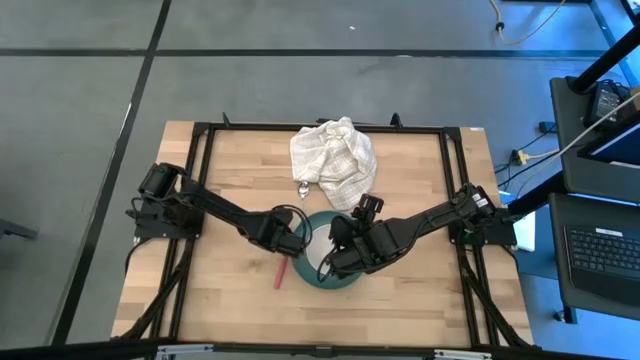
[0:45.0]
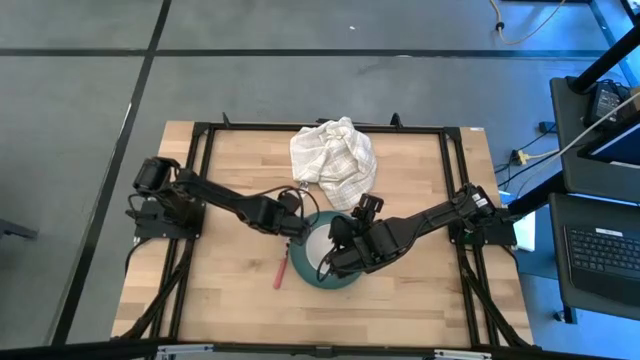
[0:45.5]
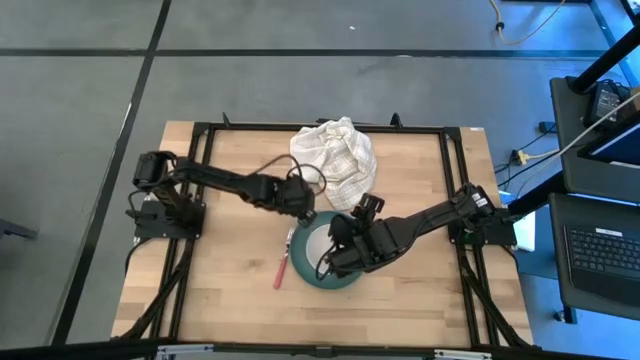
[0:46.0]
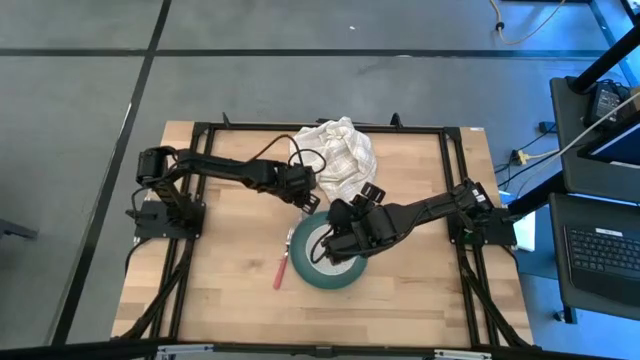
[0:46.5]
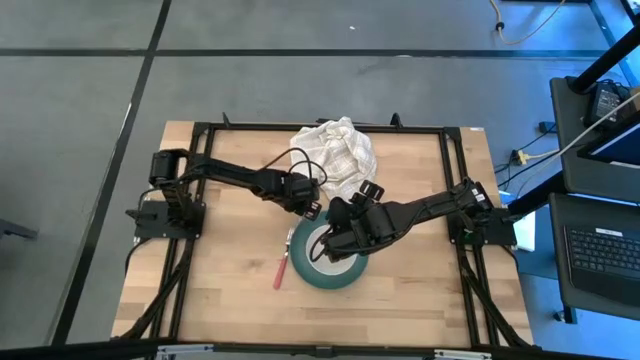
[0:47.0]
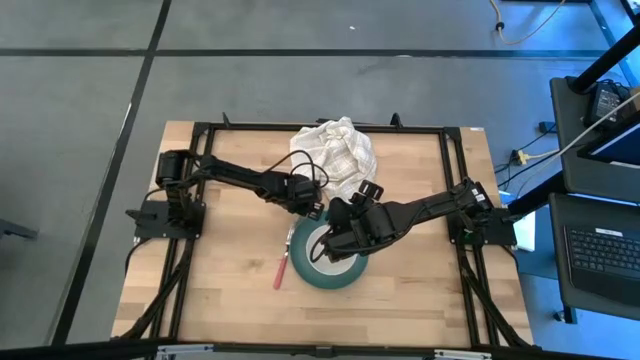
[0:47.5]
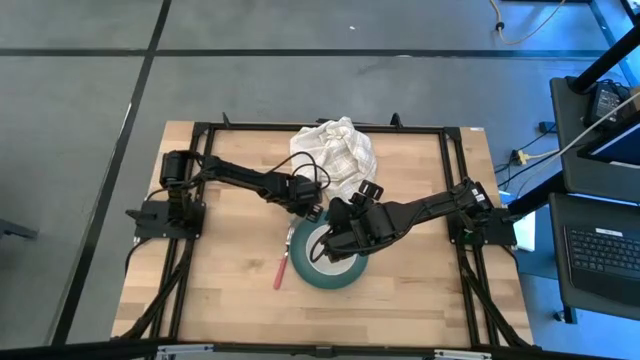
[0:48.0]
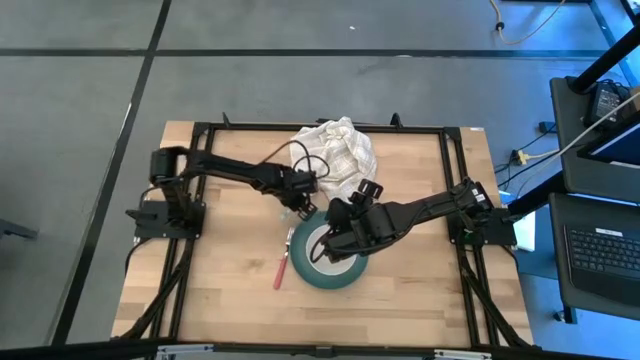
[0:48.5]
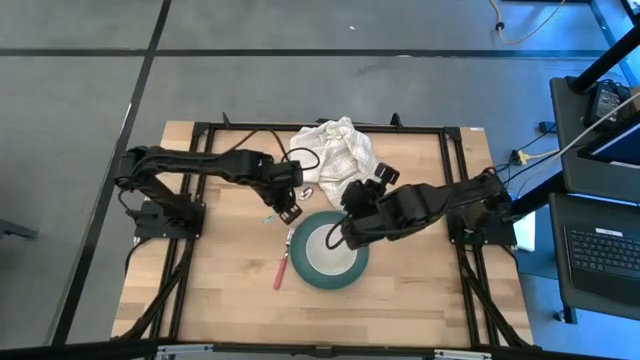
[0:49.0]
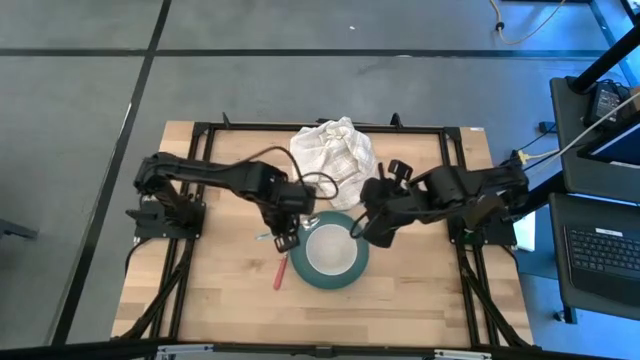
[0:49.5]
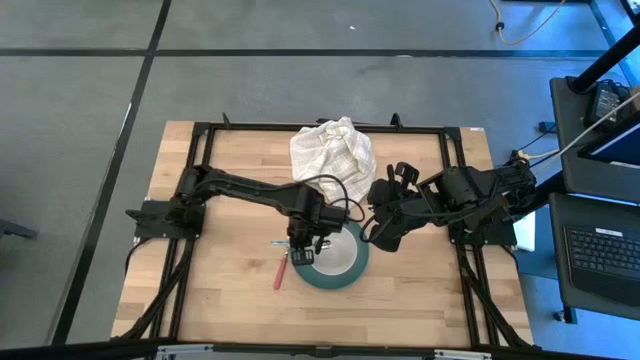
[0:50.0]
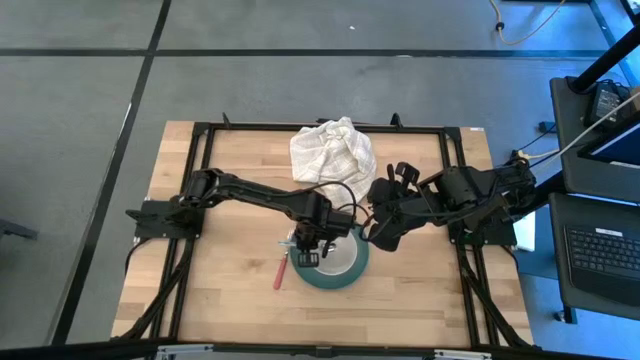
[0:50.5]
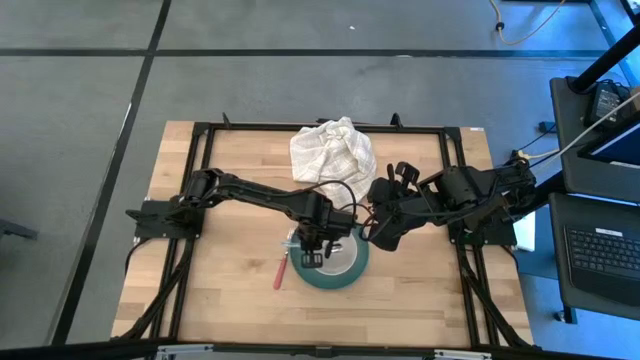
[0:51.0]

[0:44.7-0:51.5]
Task: Set table place
Put the blue spoon into the white bowl

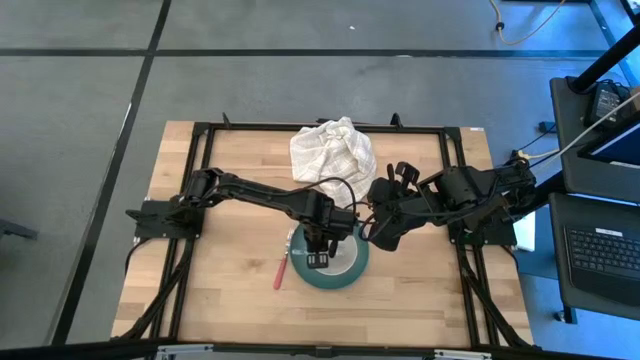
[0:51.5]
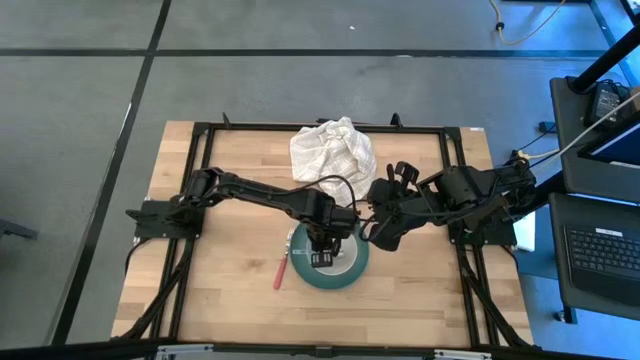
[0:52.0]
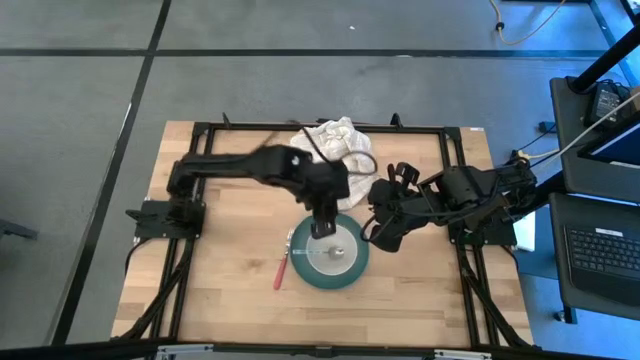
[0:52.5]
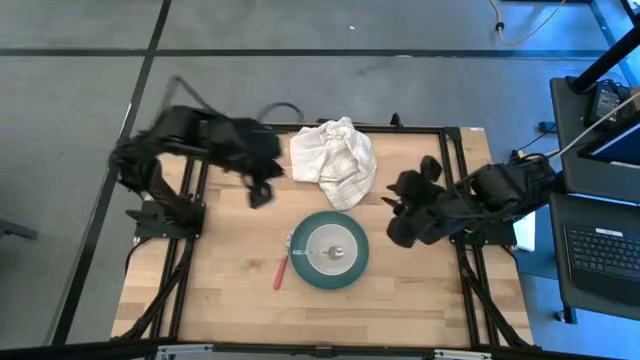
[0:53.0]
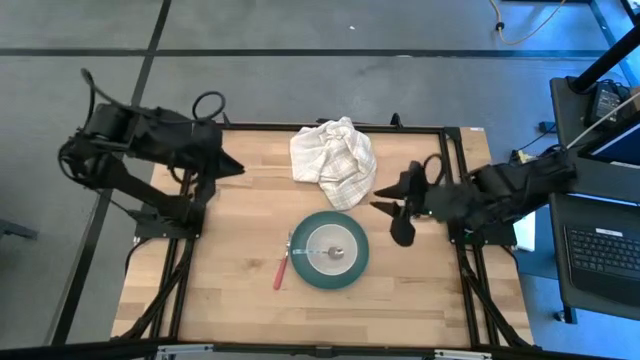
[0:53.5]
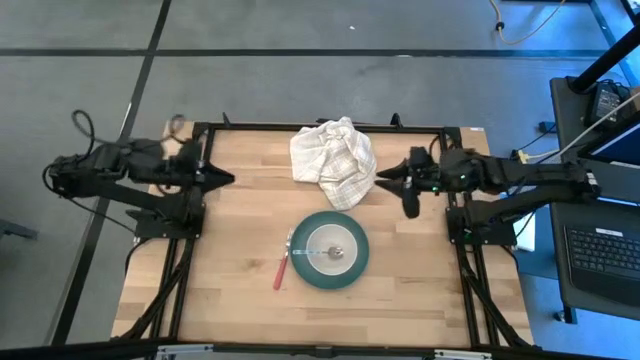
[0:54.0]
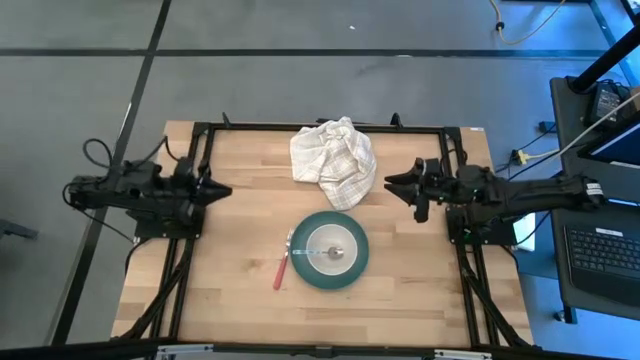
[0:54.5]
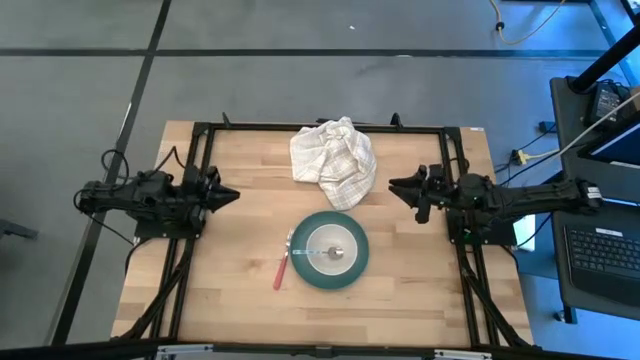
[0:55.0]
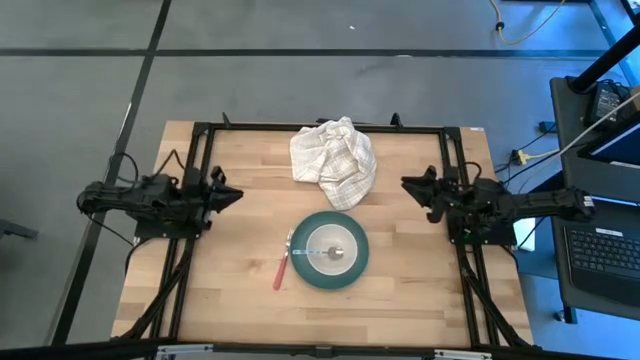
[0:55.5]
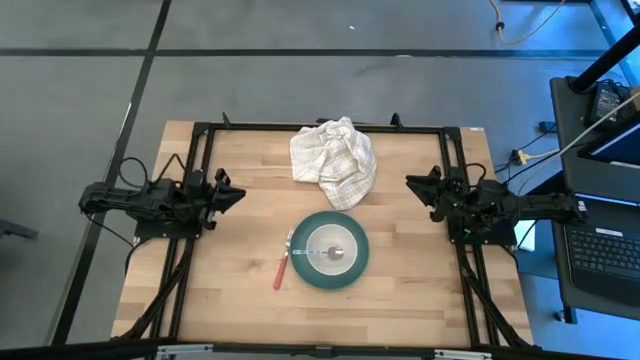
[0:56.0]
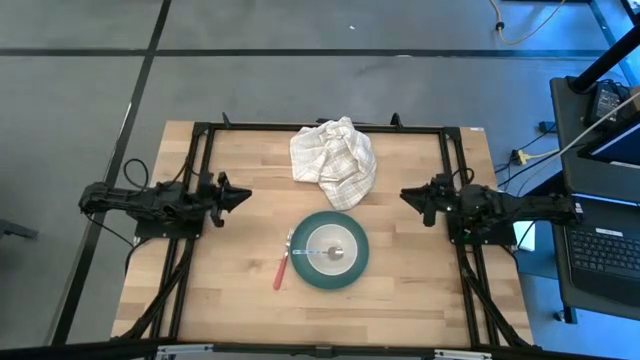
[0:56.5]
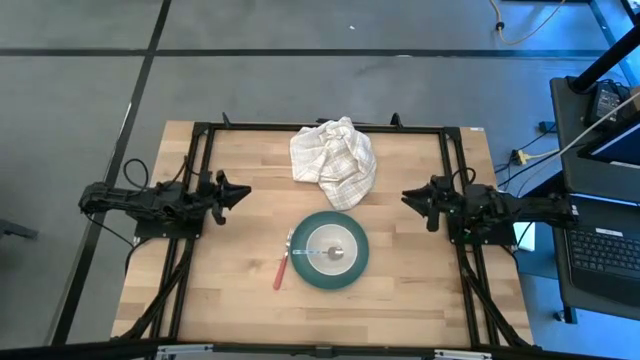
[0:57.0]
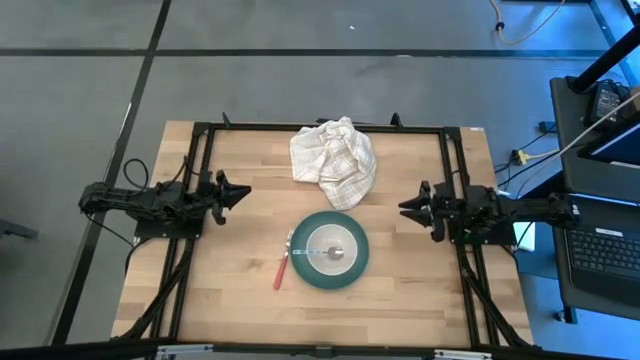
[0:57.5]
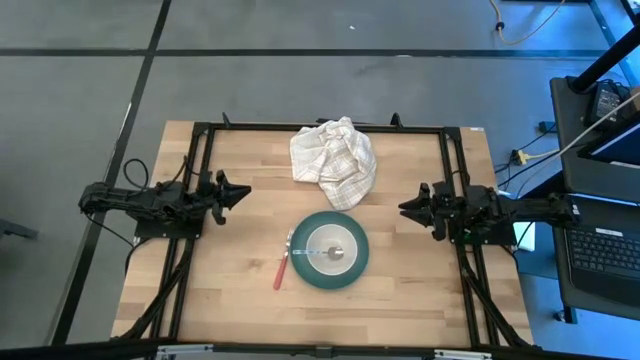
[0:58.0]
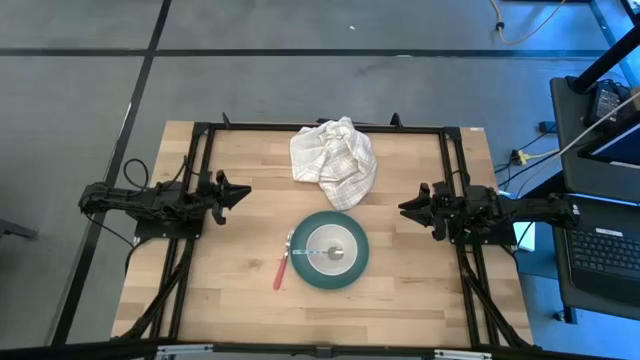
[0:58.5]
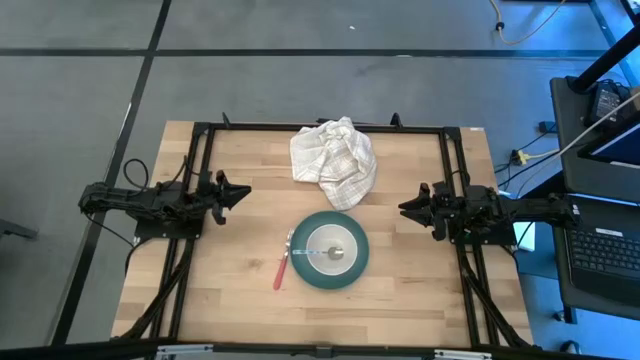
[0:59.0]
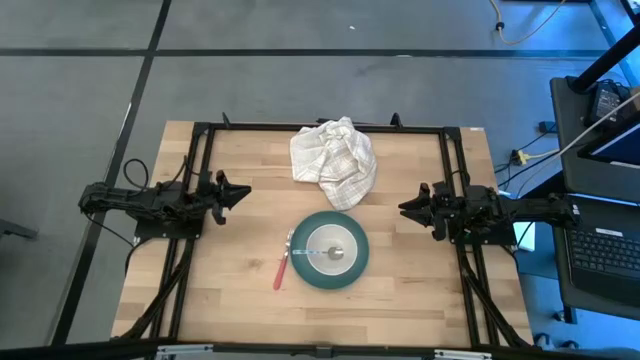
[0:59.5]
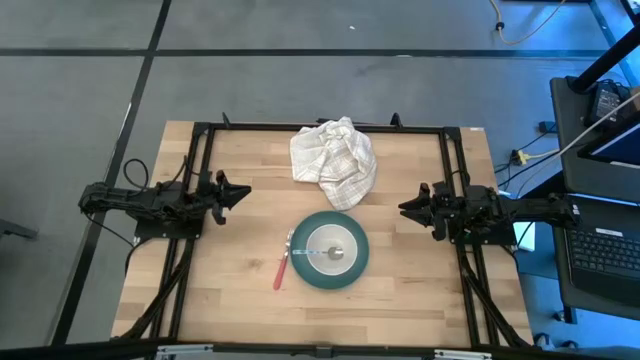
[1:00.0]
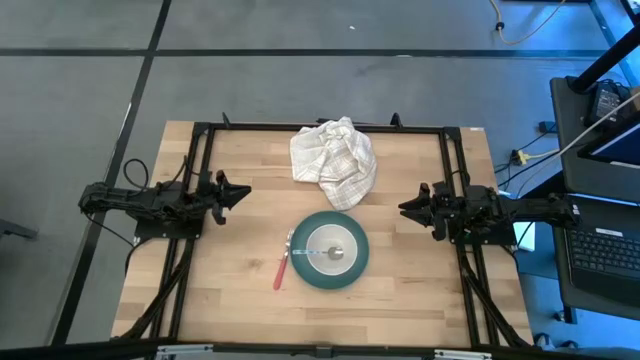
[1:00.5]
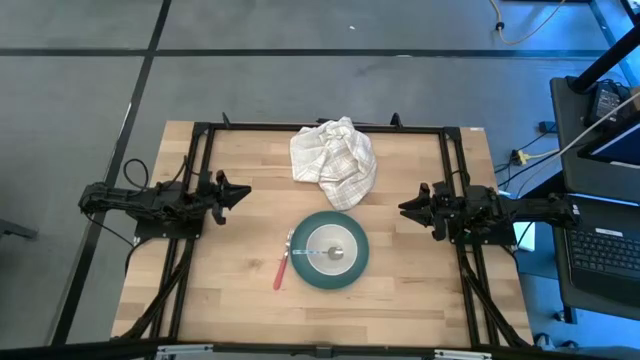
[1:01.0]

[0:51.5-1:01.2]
Return to Home Position

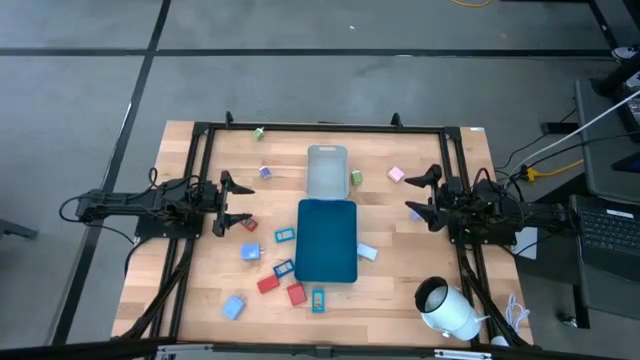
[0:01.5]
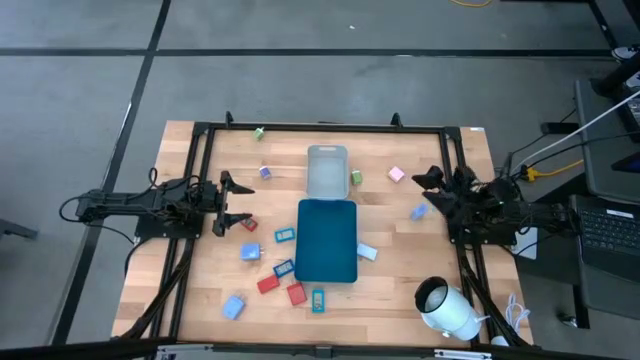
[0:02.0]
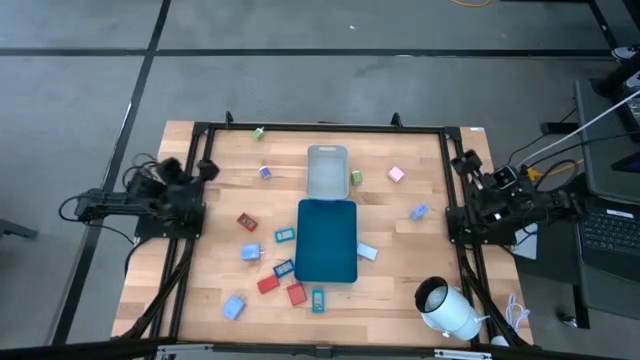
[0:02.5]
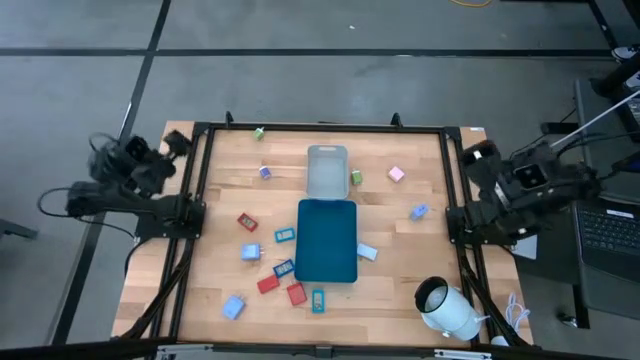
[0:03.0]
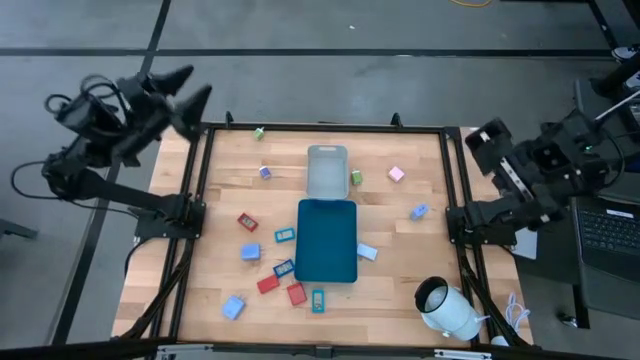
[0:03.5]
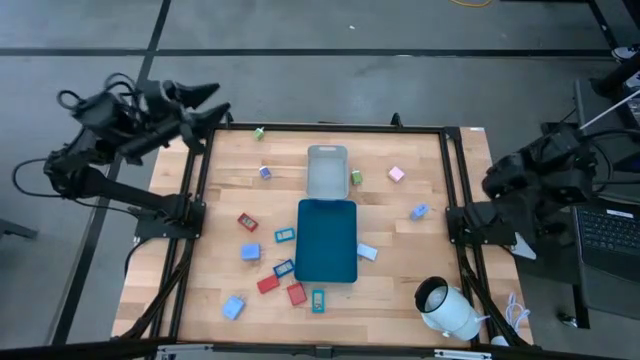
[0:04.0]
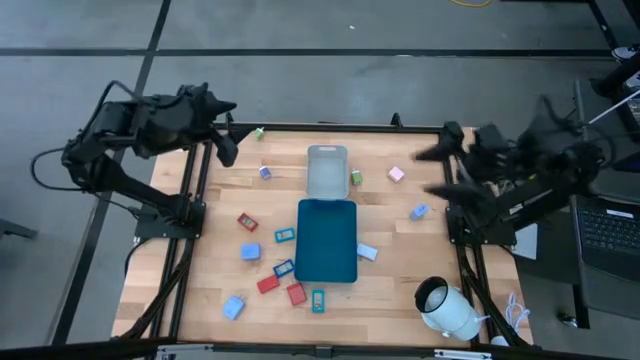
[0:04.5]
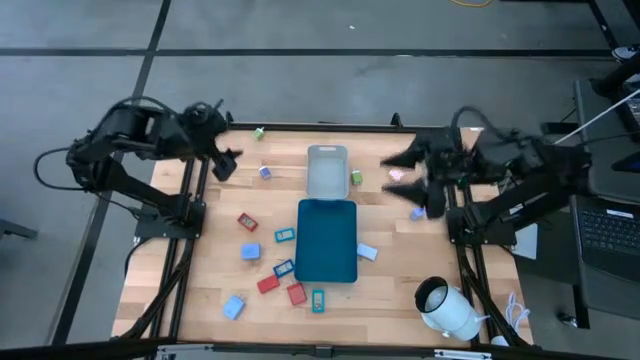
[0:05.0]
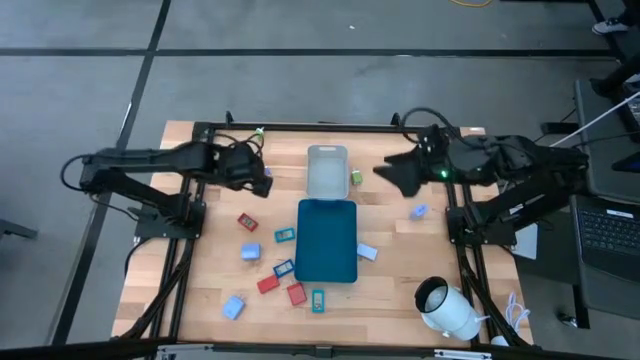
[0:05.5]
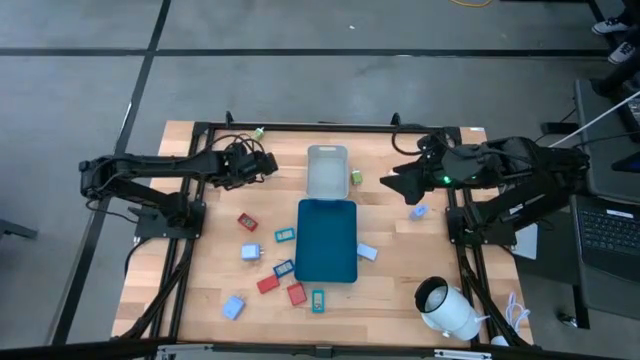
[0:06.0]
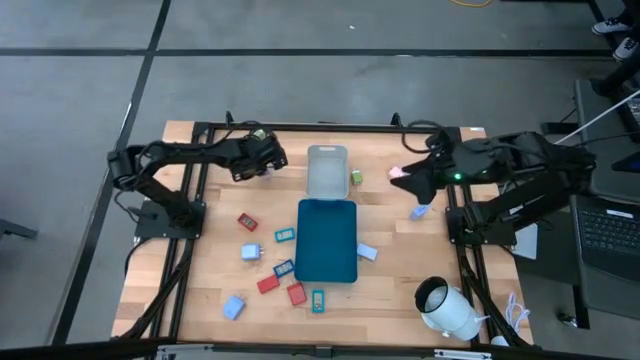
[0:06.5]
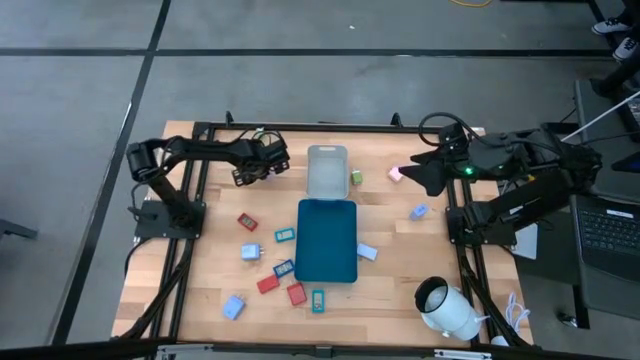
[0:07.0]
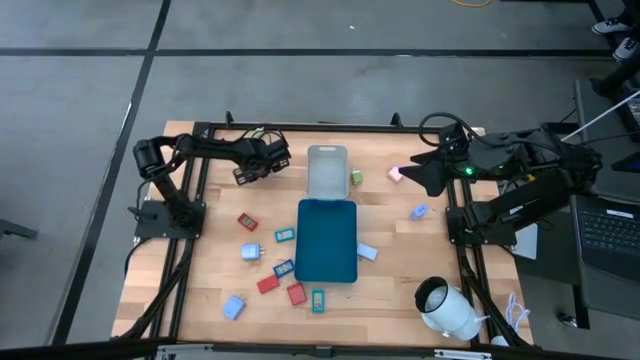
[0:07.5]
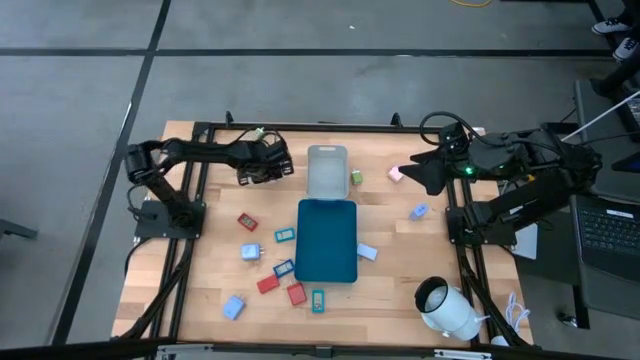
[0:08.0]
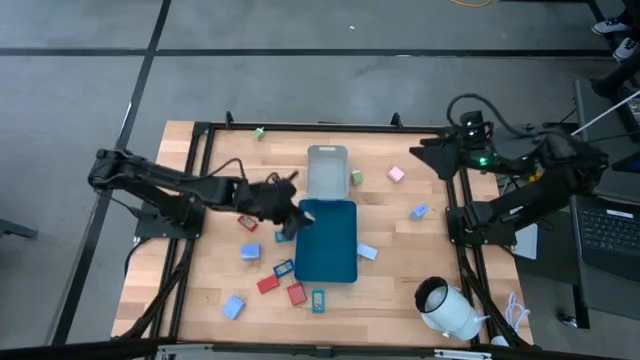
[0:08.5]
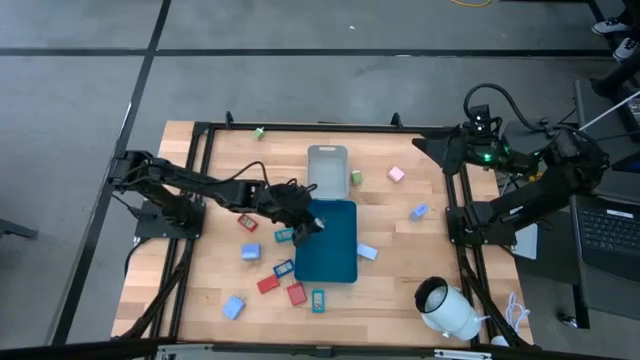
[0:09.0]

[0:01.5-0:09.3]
Task: Pick & Place Office items
Put the violet charger adapter into the blue bin
